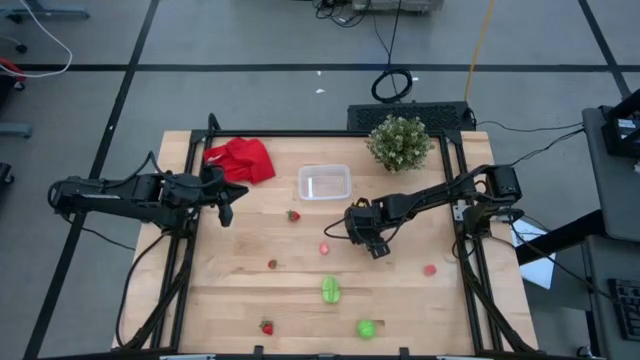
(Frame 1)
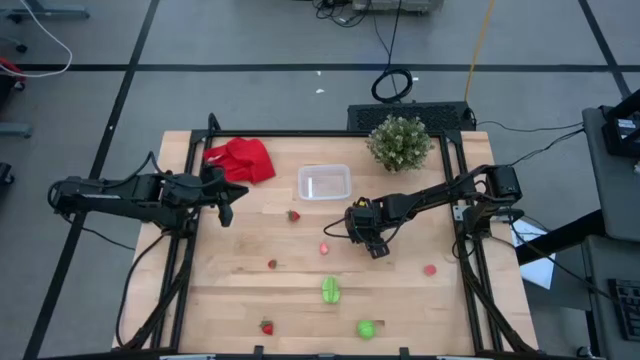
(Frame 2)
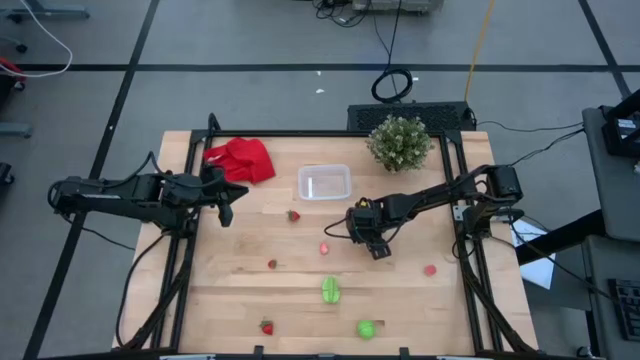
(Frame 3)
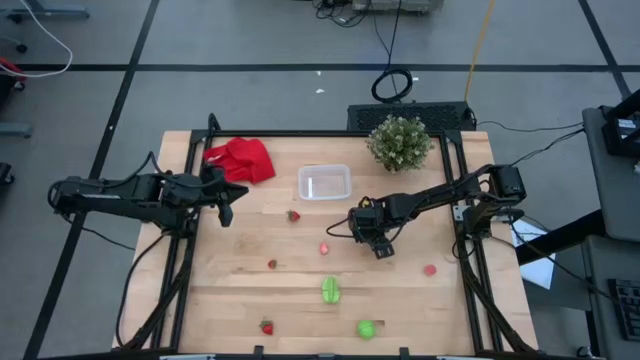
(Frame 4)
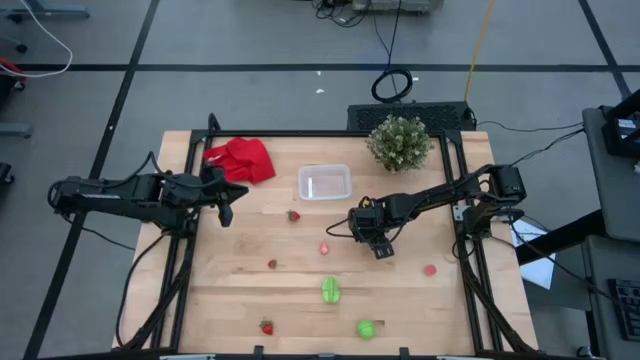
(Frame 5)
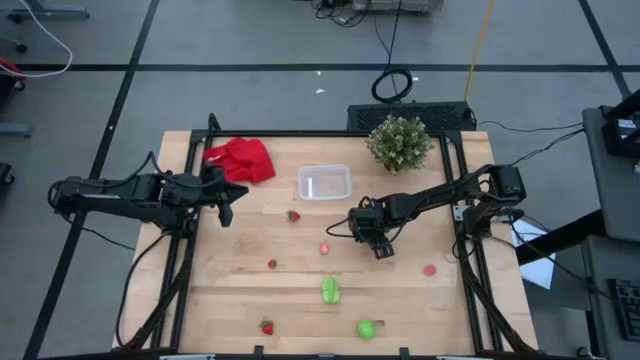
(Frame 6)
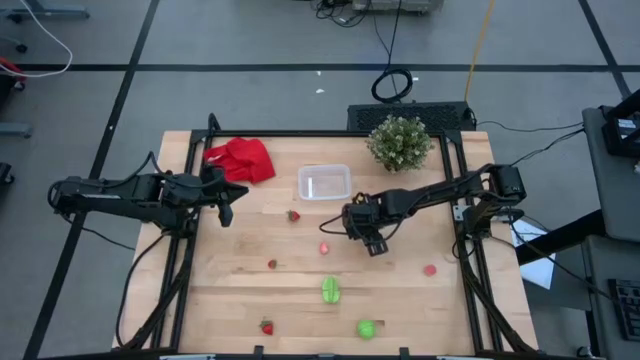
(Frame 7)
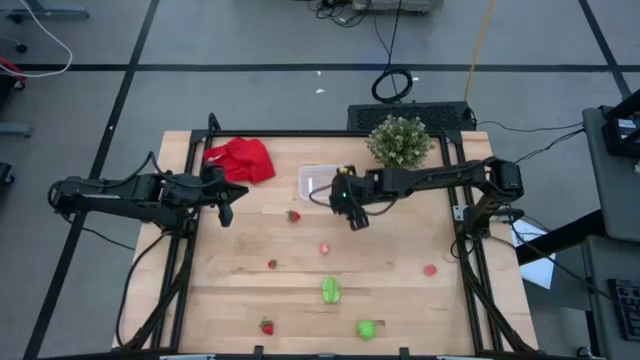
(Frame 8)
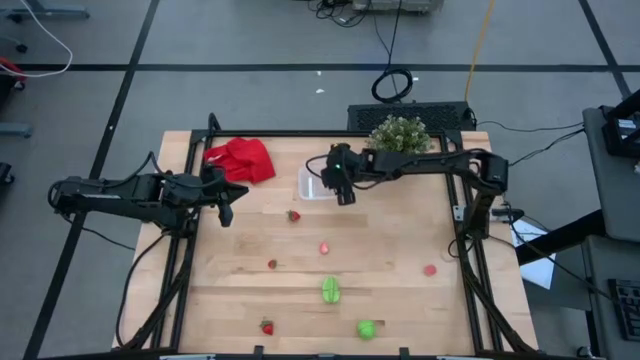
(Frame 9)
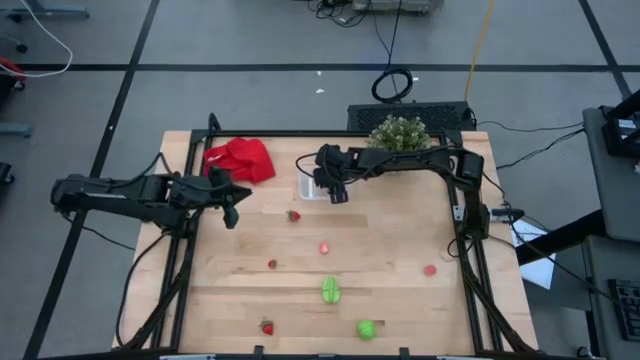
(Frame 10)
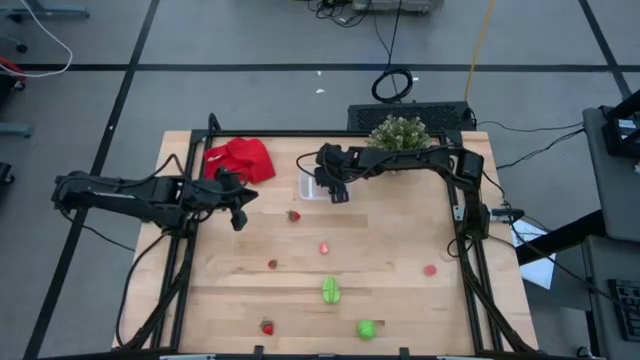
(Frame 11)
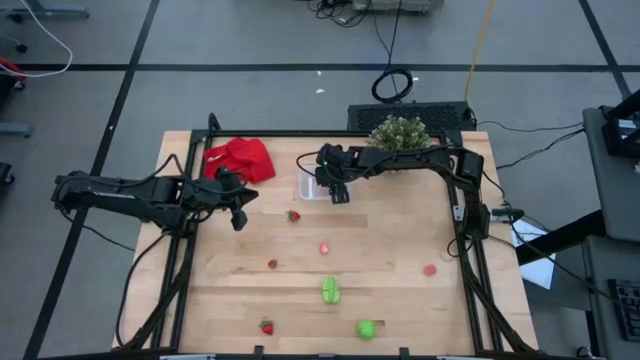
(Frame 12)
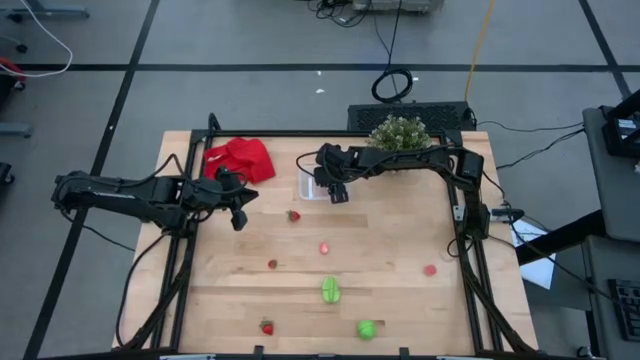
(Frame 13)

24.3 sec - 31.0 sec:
Task: Pick and placing Produce into tupperware
Put the kiwi into the bin

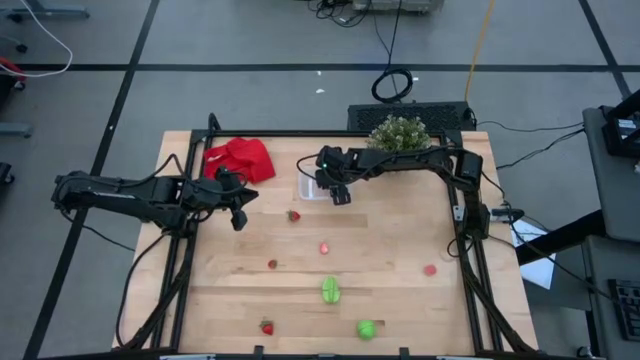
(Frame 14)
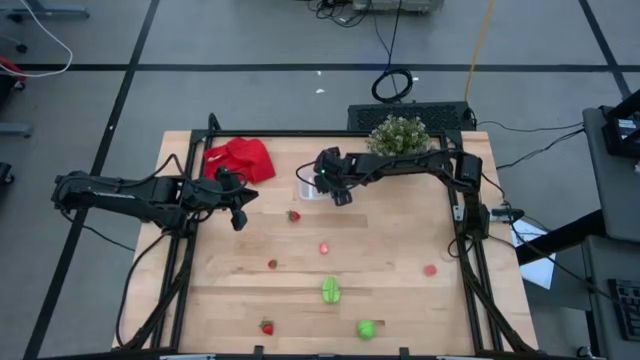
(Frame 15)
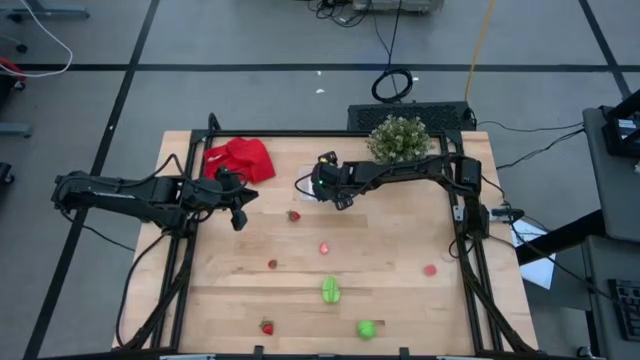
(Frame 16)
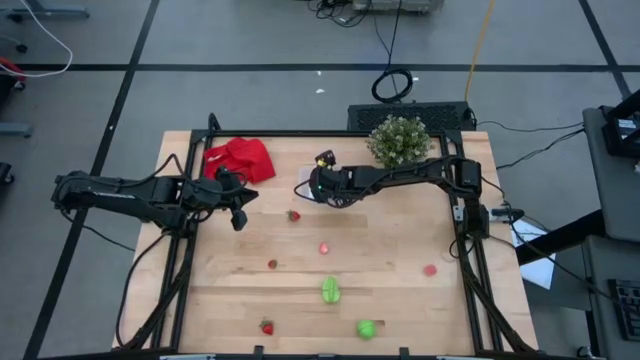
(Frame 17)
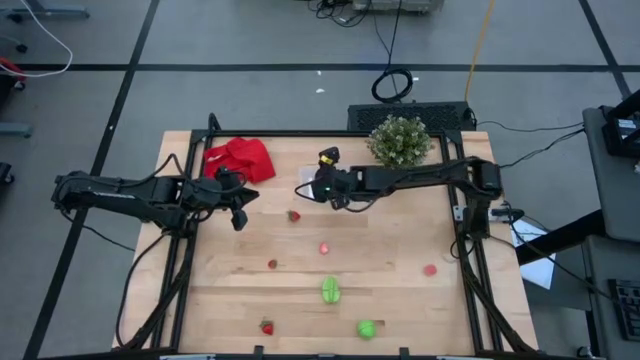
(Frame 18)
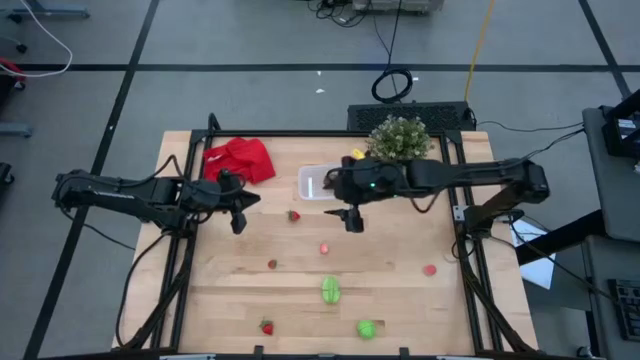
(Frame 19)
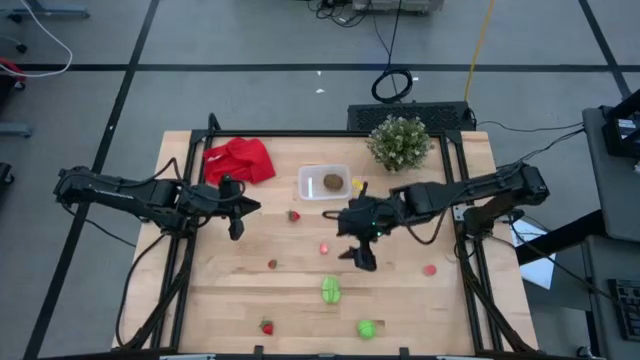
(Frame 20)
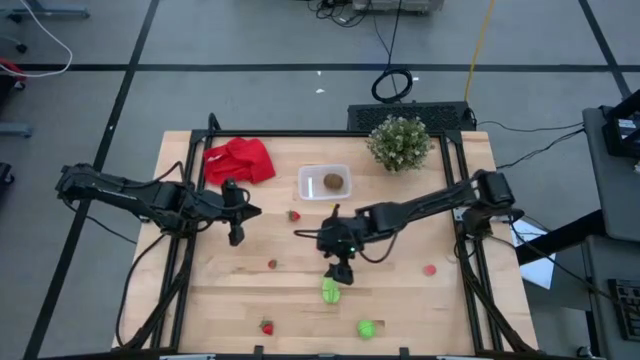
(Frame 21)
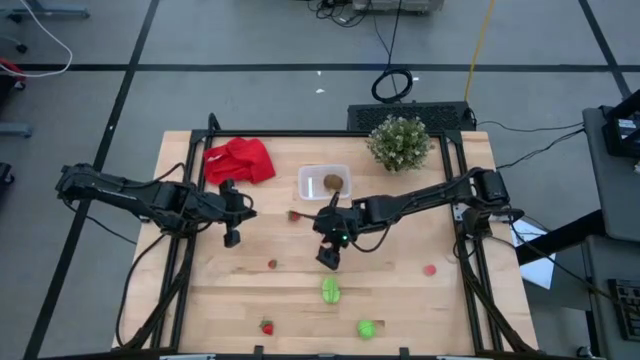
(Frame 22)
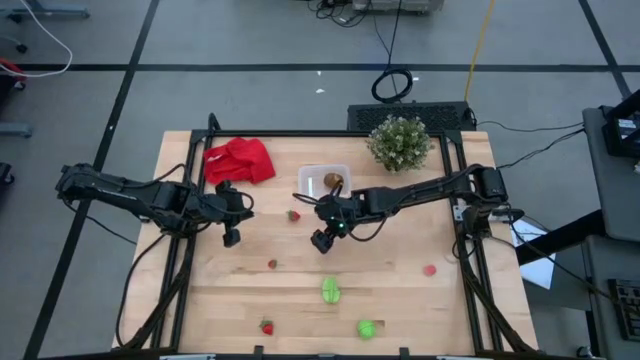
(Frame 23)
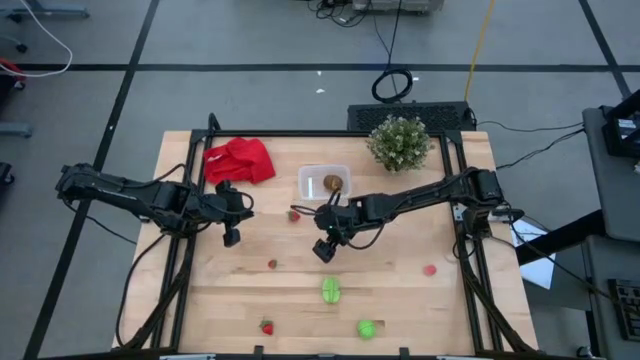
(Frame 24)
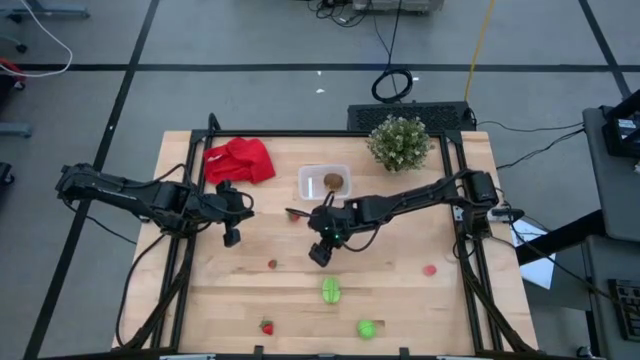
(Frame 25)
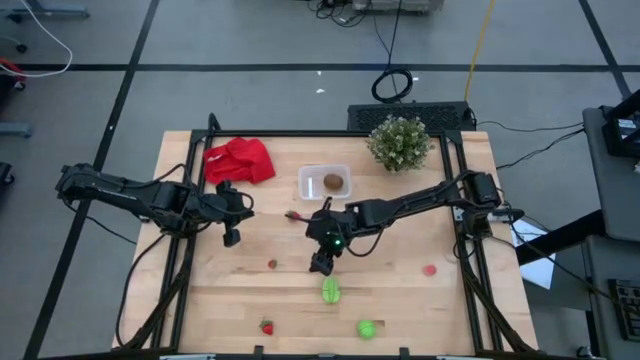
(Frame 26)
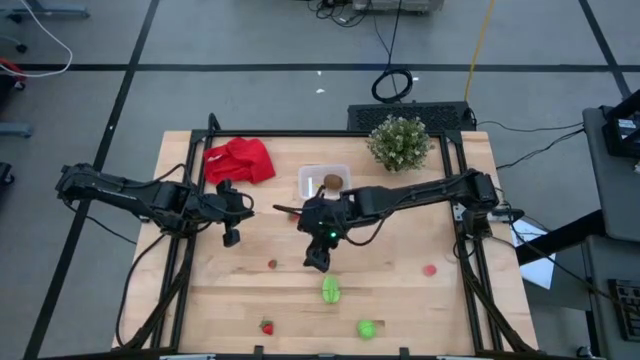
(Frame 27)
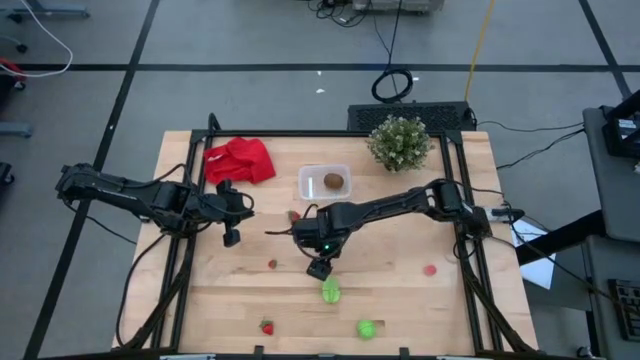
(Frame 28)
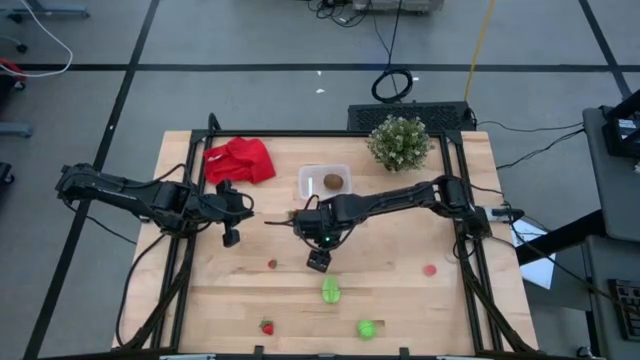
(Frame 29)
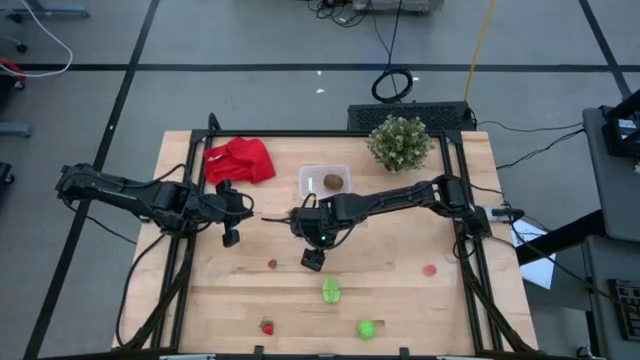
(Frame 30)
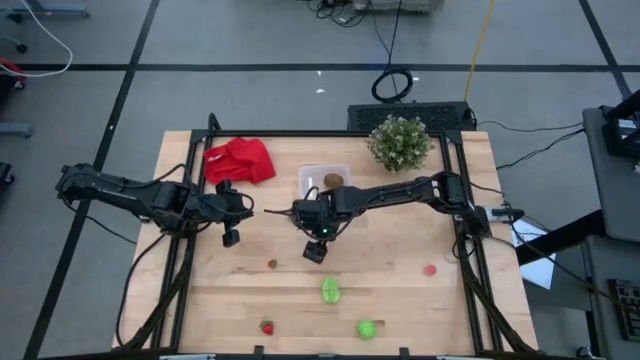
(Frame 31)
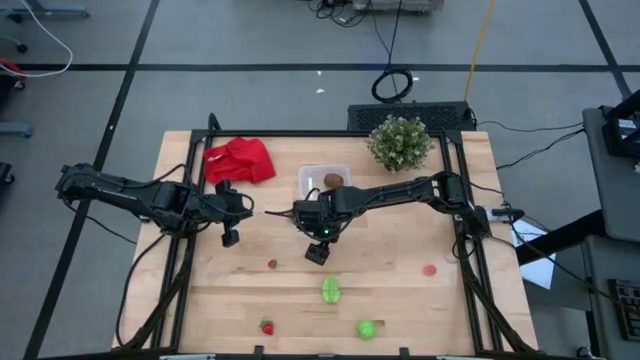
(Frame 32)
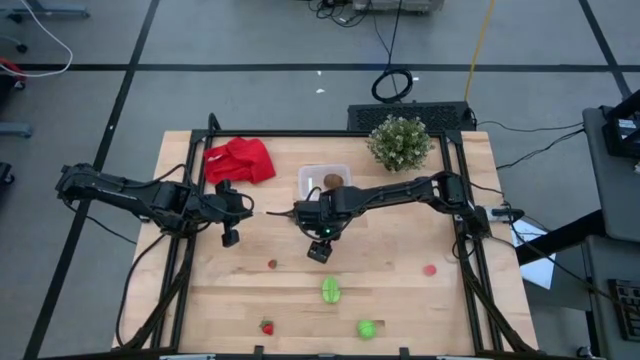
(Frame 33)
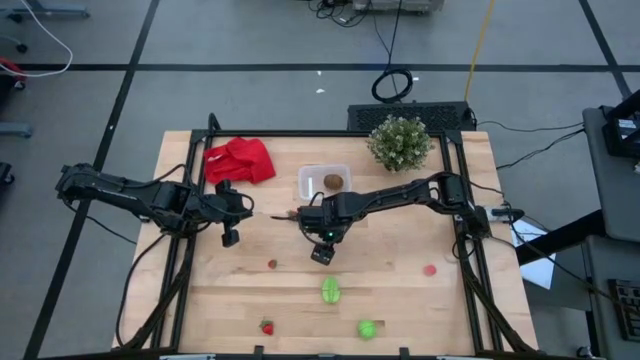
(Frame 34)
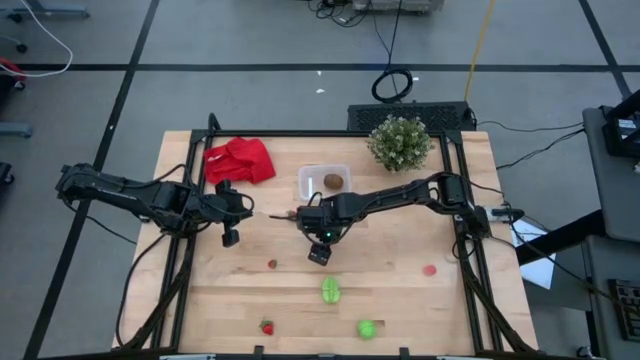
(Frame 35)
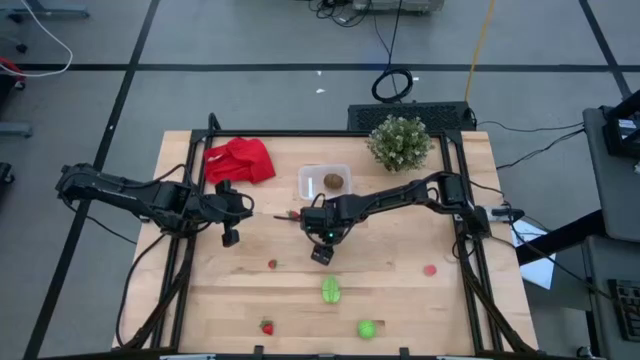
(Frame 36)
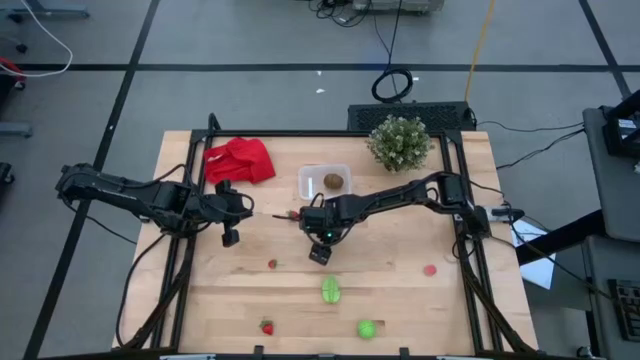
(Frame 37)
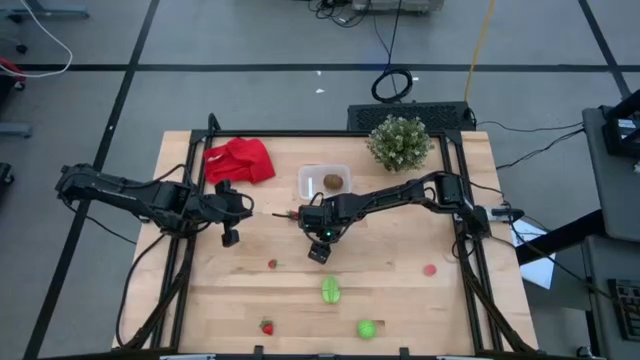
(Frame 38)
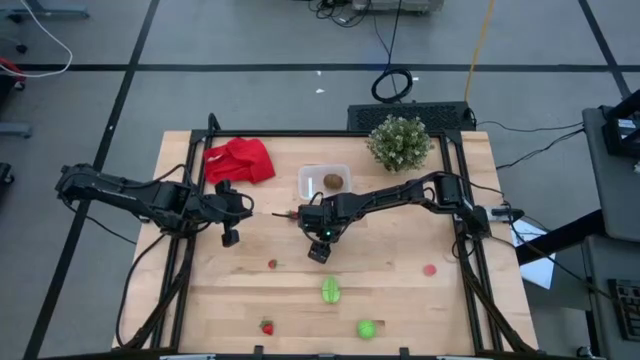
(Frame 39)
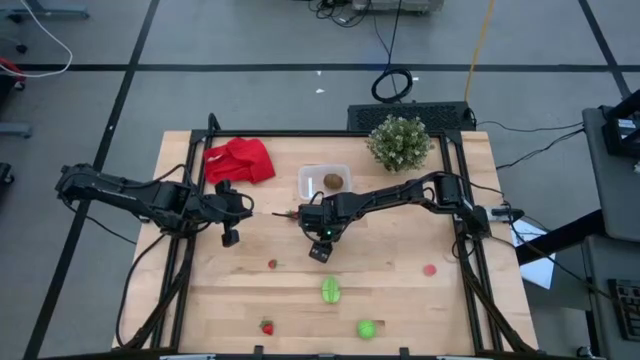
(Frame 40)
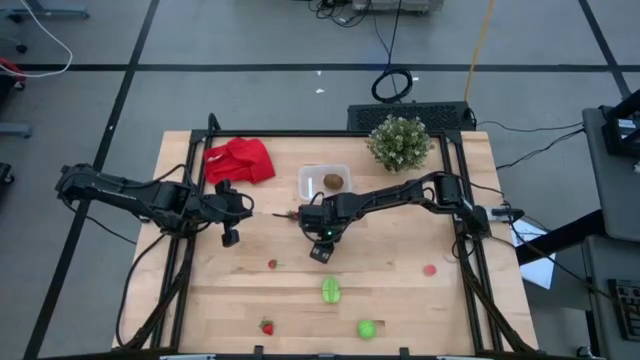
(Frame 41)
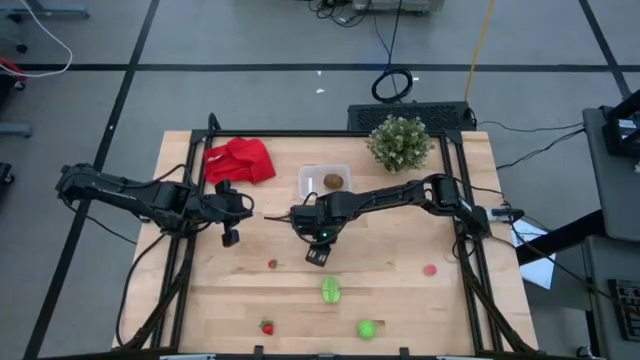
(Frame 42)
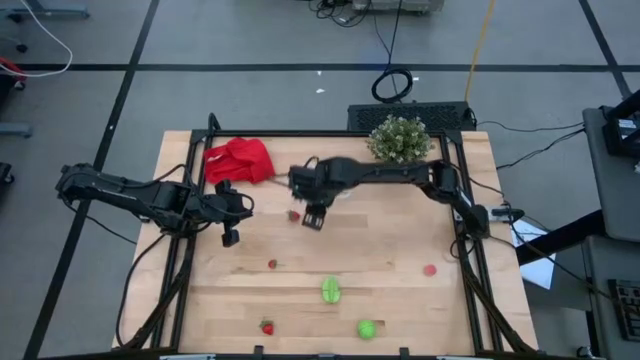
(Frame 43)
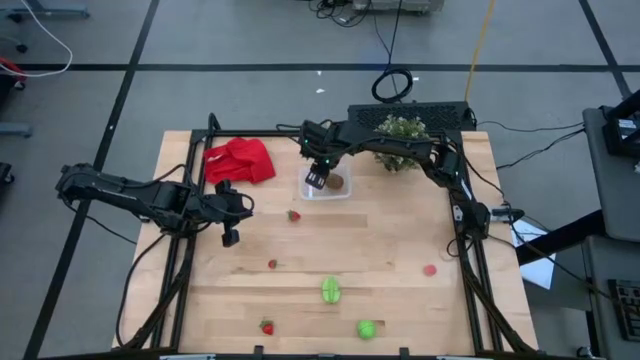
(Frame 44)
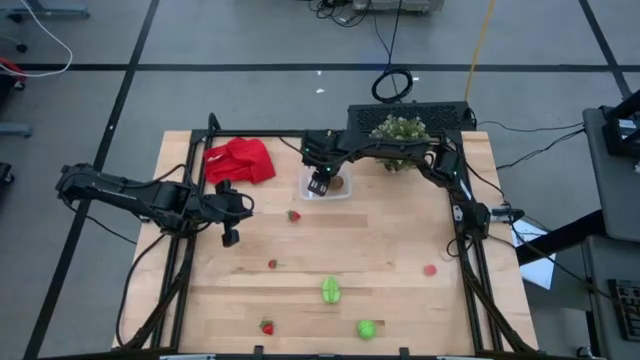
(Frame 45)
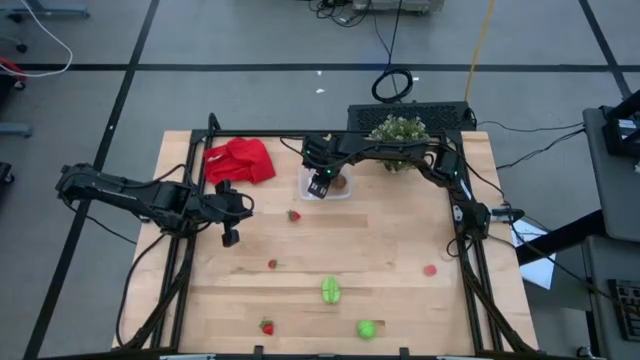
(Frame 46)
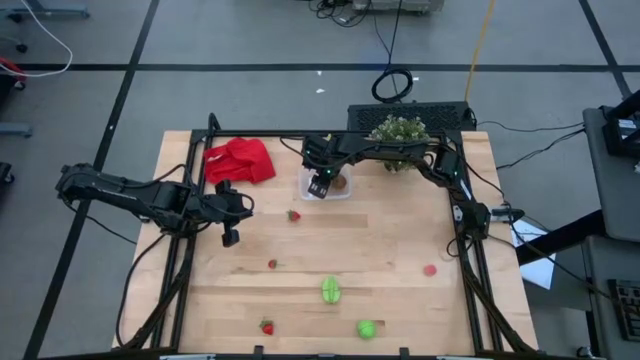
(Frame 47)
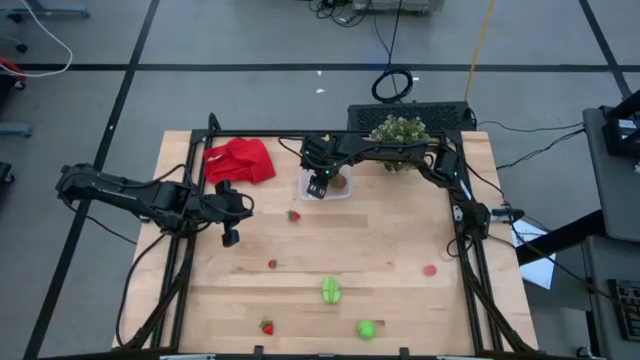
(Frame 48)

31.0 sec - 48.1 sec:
Put the left apricot into the bin
